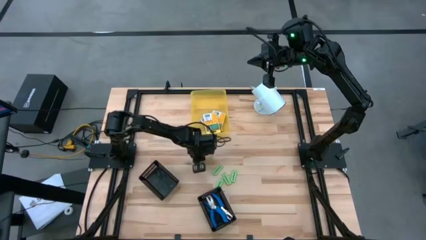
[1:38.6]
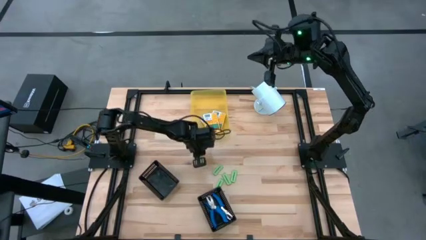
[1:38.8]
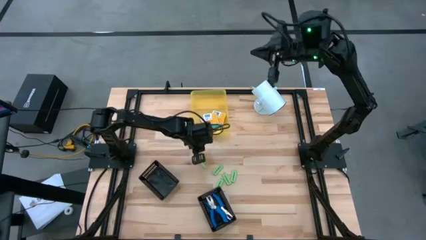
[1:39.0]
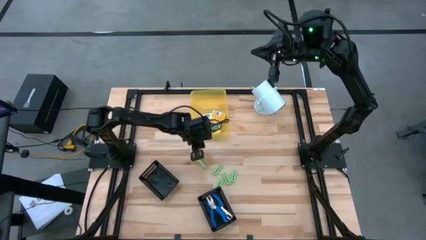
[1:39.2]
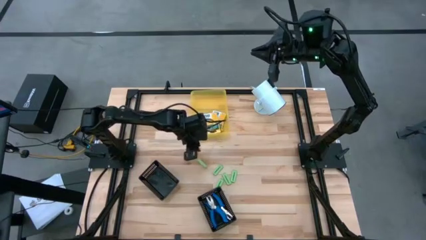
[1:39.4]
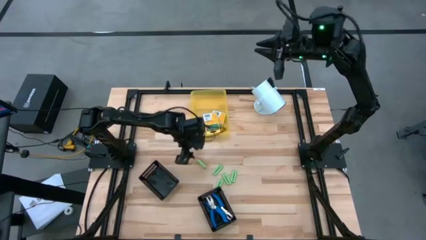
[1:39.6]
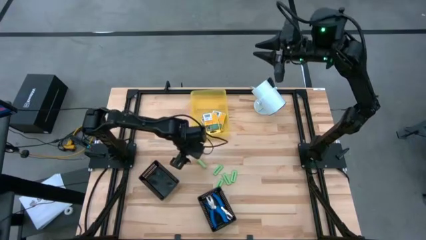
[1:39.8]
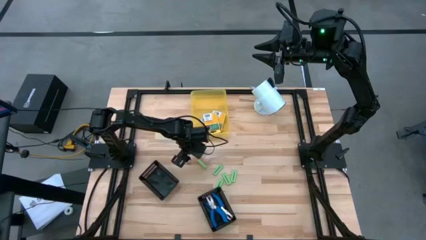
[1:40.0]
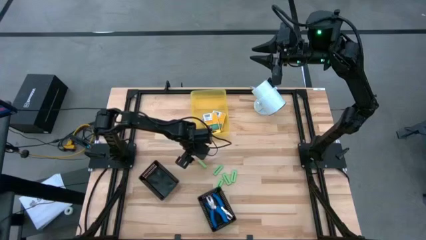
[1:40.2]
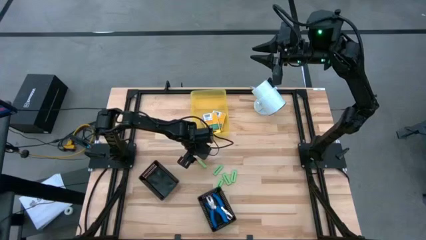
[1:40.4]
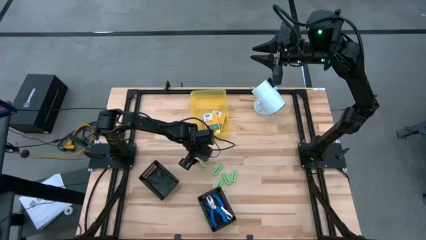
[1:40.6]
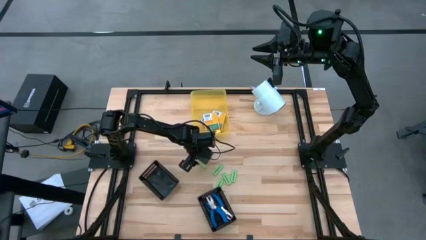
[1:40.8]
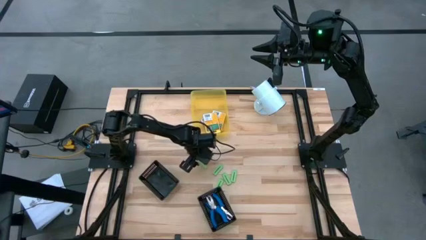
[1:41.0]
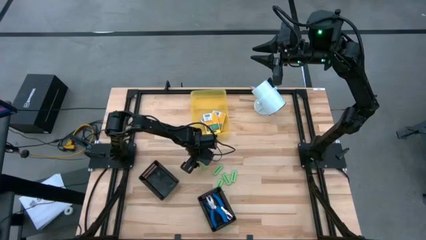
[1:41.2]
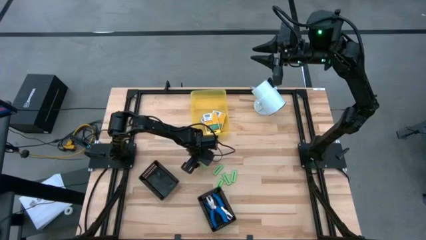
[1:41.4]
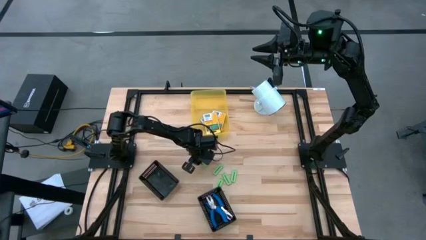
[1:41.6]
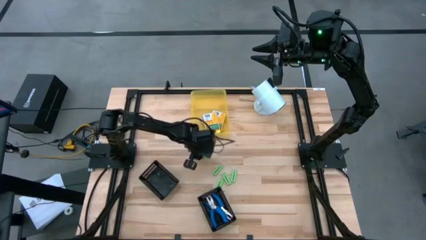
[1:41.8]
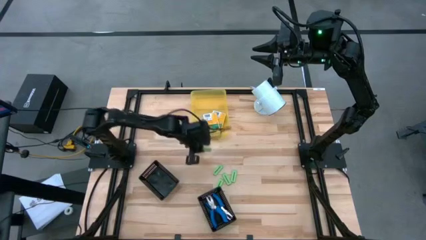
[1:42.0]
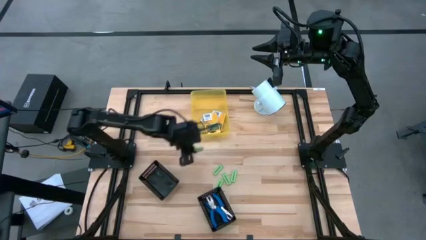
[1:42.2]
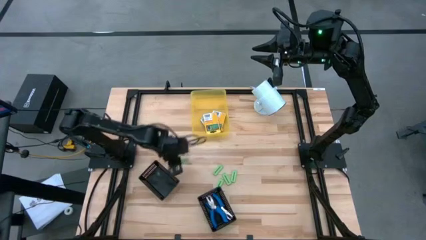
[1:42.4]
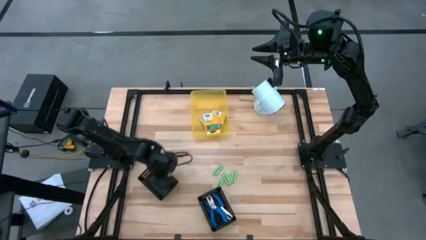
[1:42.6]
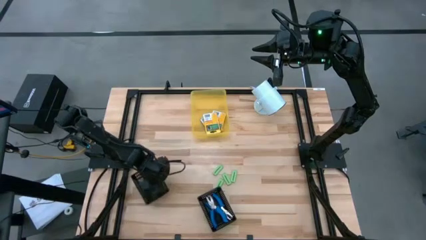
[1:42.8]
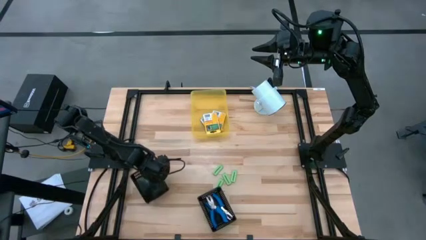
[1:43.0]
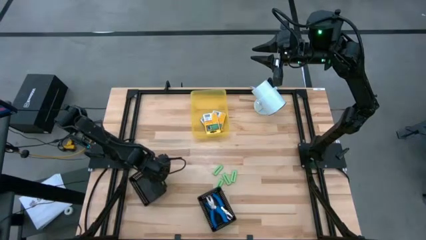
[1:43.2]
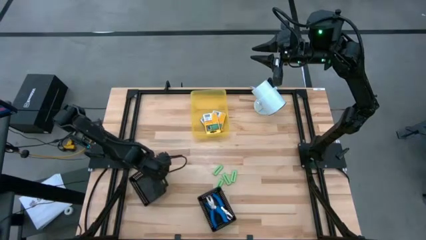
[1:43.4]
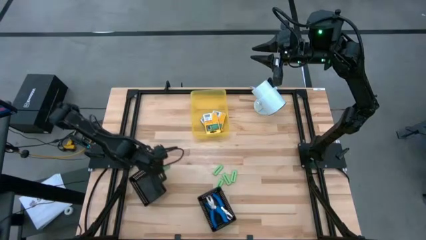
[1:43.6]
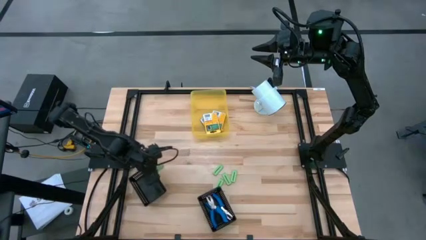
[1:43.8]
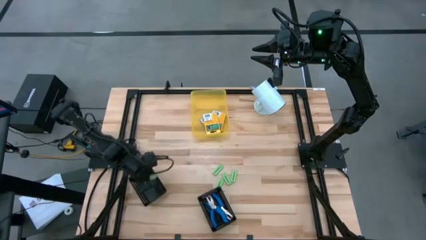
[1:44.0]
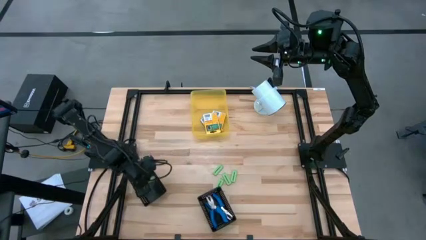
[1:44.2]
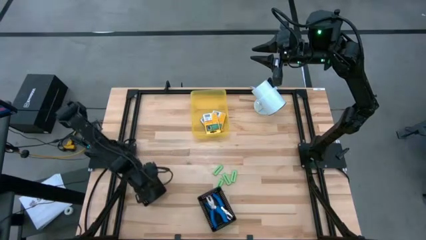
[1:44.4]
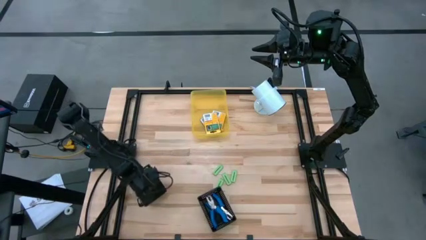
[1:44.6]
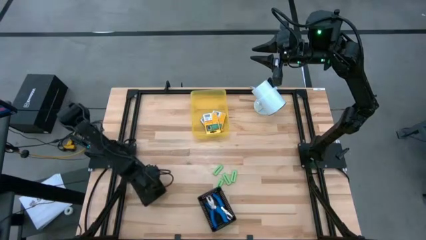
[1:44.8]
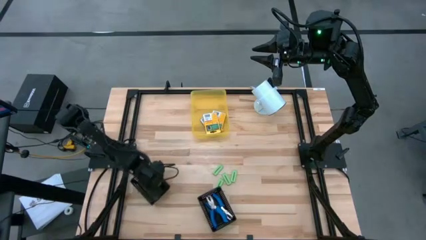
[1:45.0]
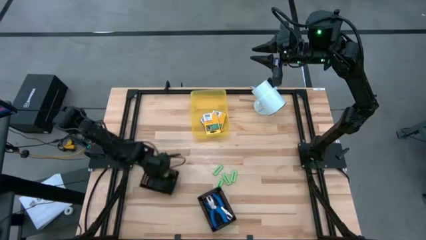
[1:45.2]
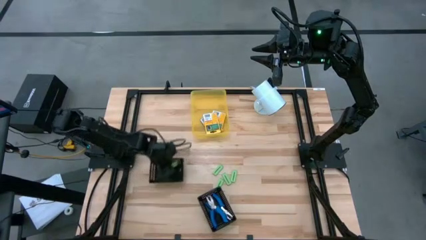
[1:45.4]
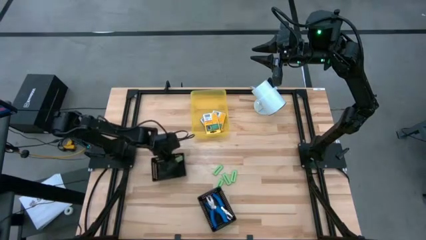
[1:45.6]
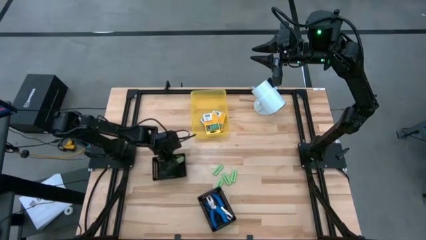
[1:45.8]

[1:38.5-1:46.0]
Task: Pick & Place School Supplies
Put the green eraser into the left black bin

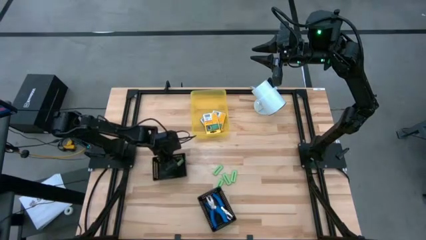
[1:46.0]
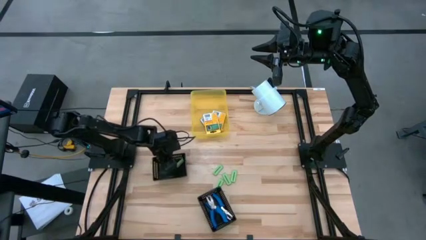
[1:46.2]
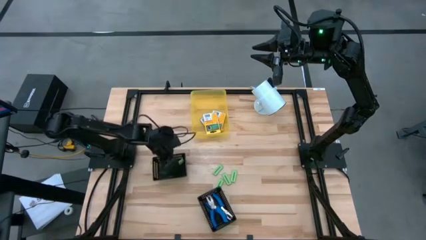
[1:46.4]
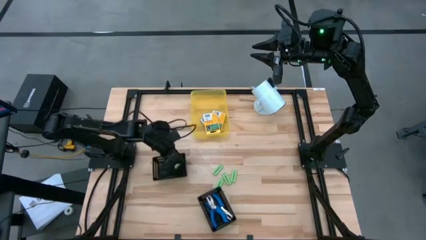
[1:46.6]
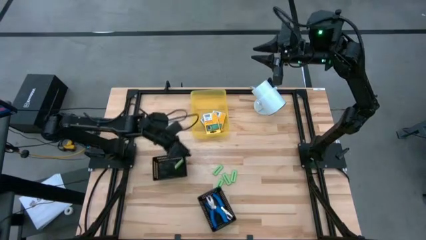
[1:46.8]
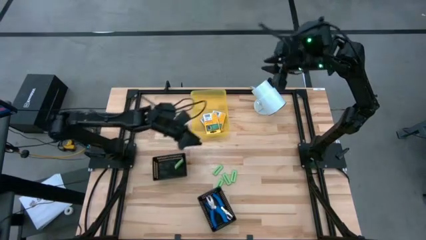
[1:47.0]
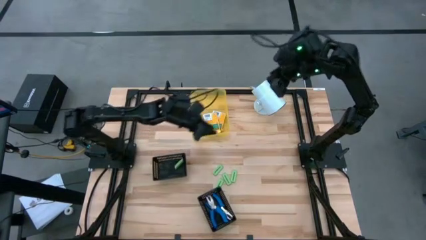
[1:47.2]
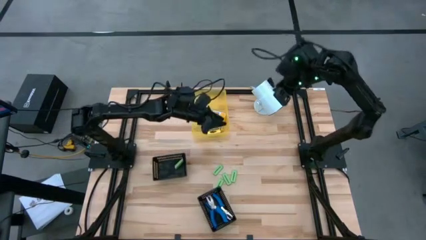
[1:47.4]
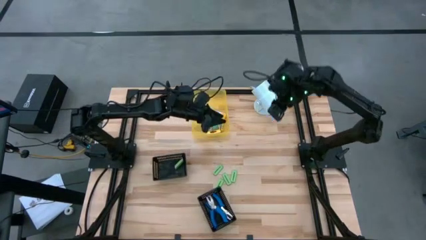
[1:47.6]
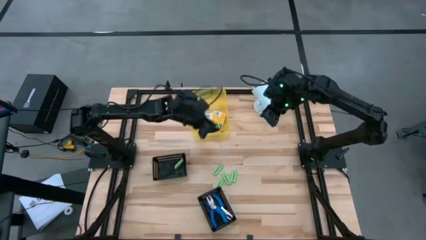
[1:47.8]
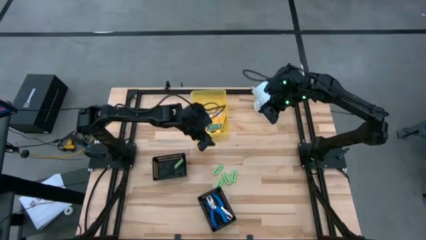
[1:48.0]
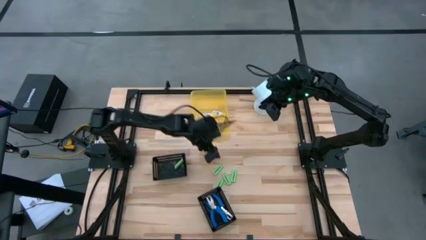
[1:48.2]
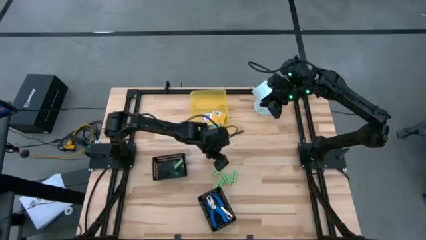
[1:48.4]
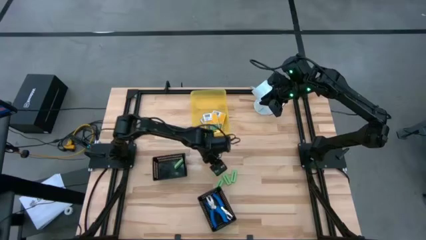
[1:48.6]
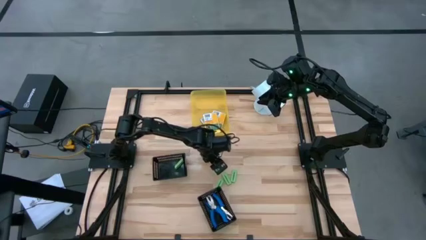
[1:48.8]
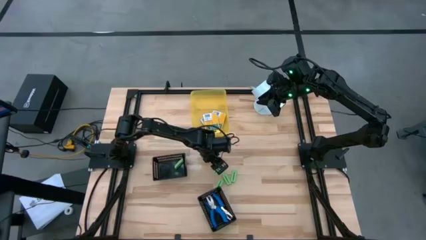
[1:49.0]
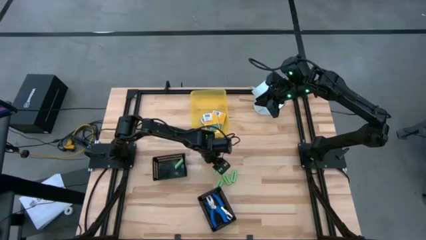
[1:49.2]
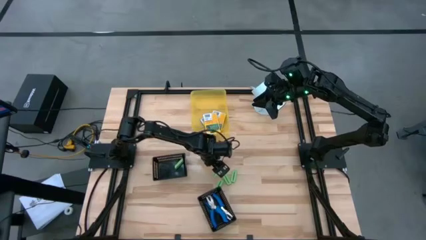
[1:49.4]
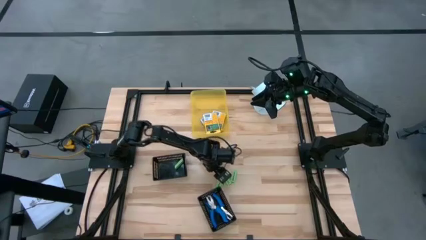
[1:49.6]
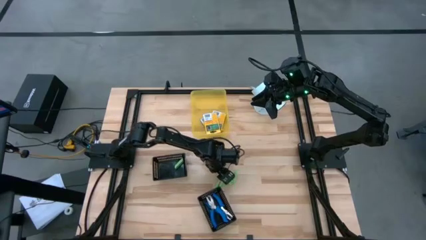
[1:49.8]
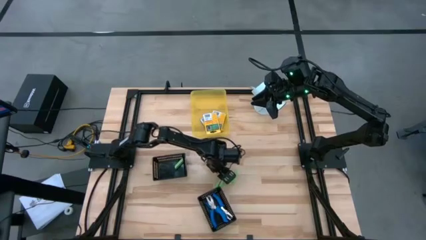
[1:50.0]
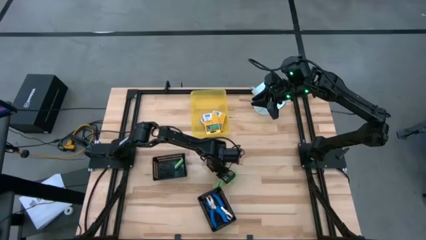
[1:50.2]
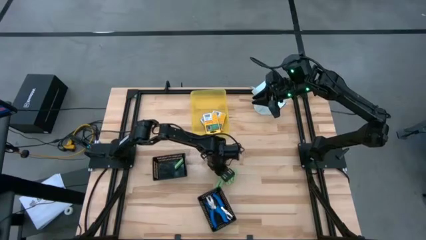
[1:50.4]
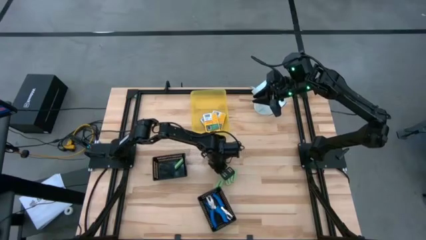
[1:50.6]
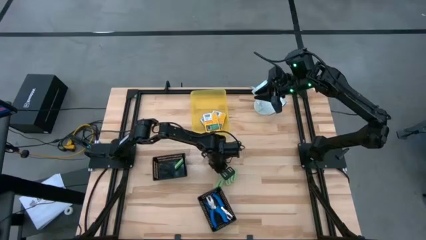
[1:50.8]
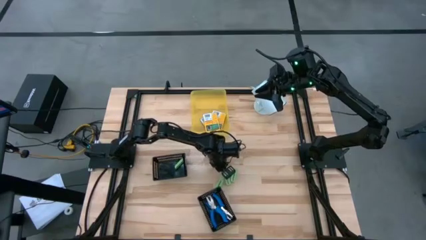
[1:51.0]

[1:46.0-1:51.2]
Put the green eraser into the left black bin

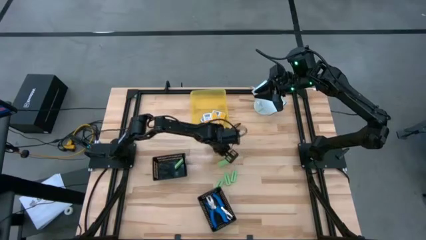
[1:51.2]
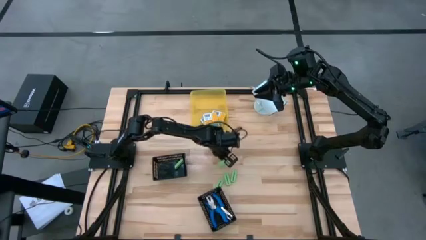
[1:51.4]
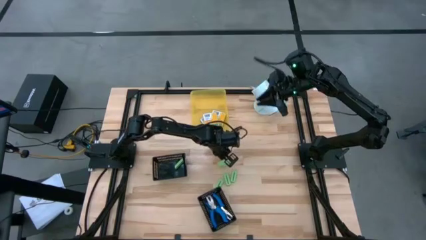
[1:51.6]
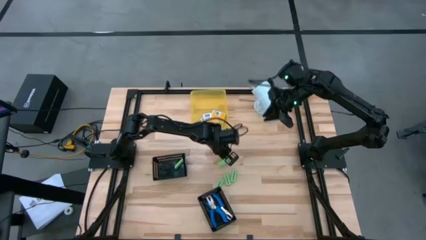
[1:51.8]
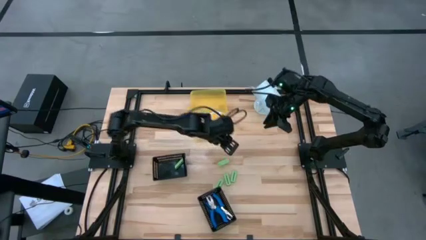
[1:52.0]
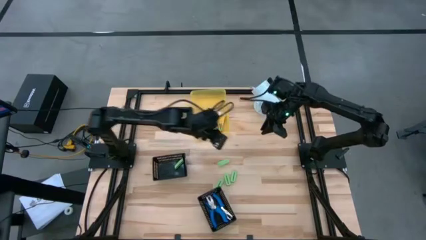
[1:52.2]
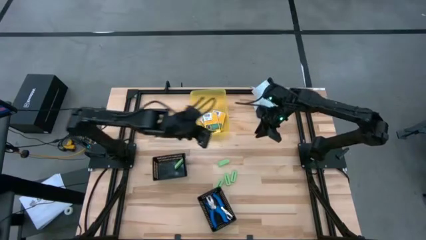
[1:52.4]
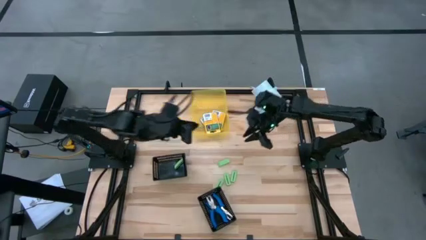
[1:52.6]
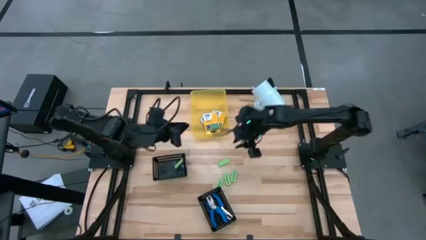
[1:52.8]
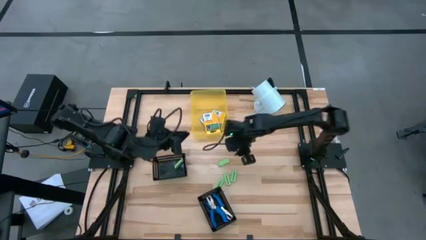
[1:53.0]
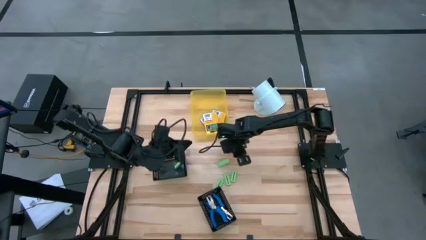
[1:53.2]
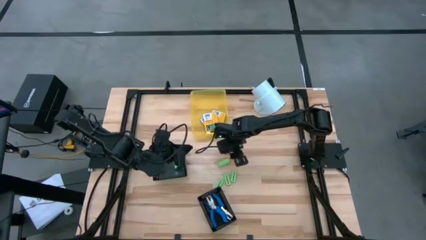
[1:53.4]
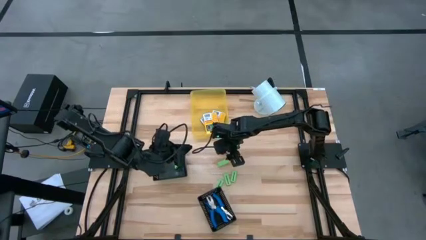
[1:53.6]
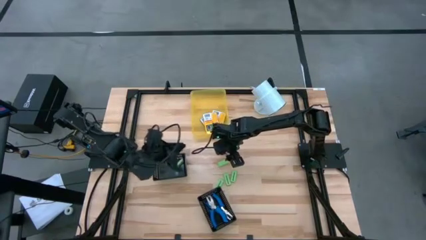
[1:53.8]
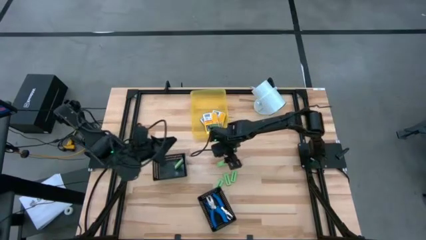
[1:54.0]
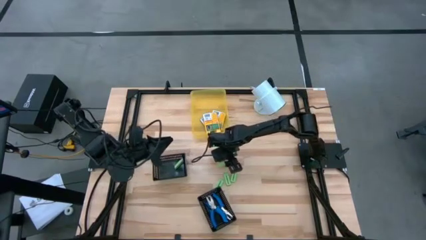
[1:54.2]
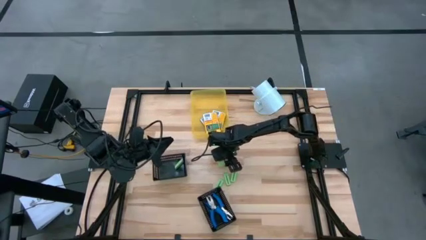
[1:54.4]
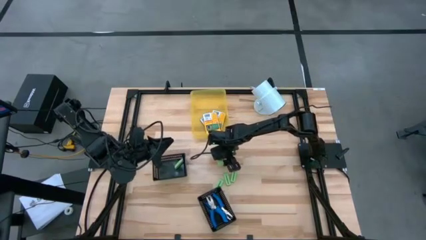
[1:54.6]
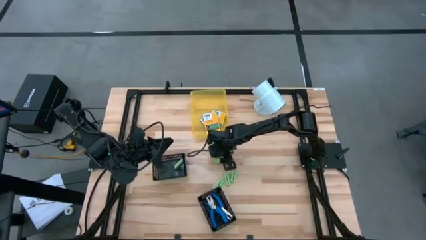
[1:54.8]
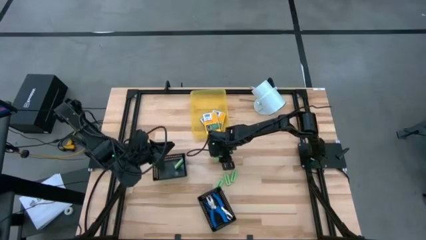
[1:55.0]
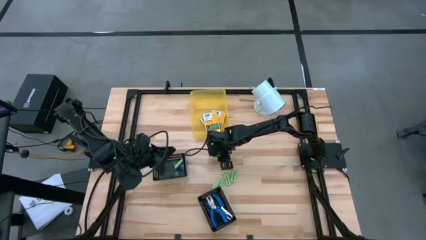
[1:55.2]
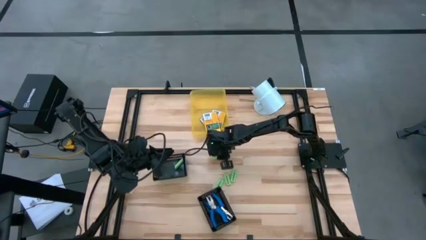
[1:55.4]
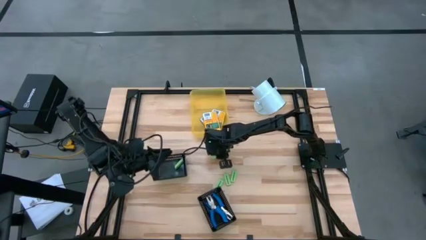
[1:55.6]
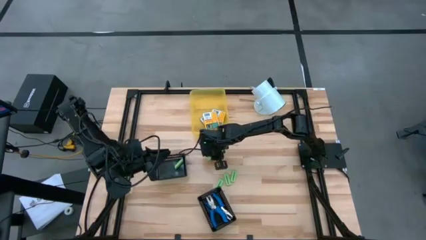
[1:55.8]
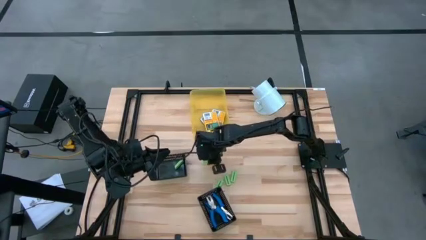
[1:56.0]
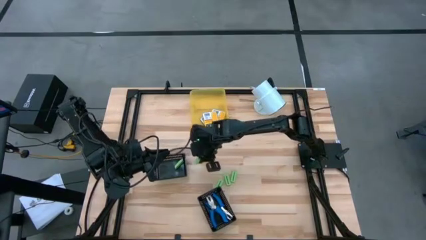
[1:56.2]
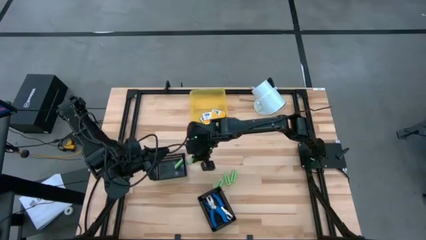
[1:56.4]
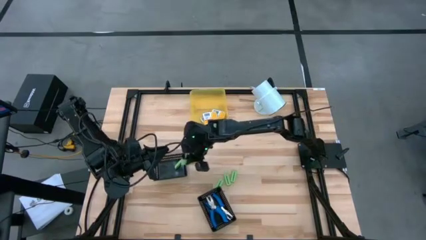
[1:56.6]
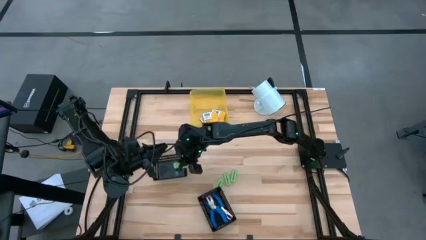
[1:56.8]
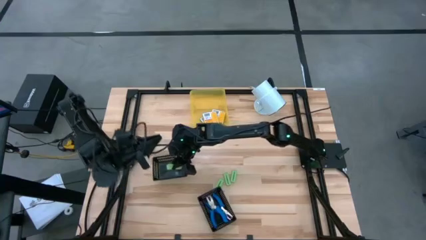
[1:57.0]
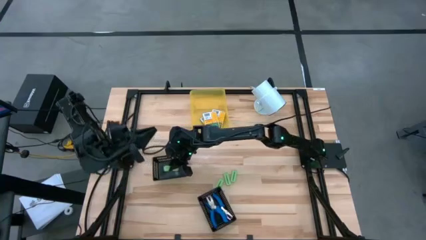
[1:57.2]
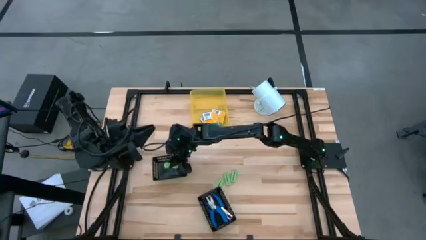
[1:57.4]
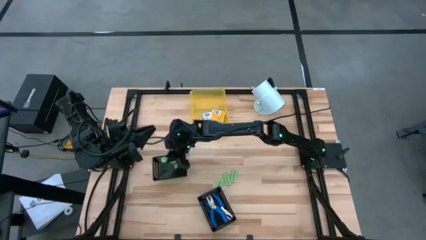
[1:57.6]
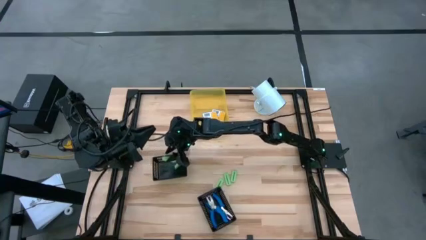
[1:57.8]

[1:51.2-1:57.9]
Put the green eraser into the left black bin
